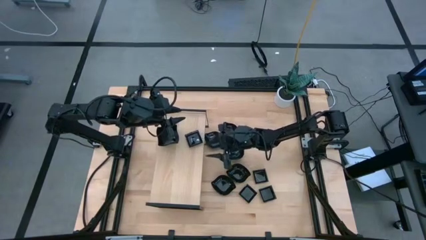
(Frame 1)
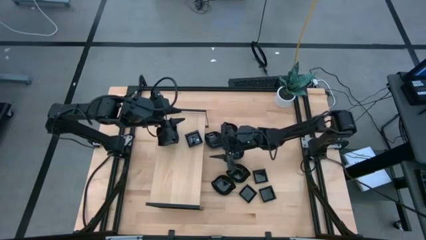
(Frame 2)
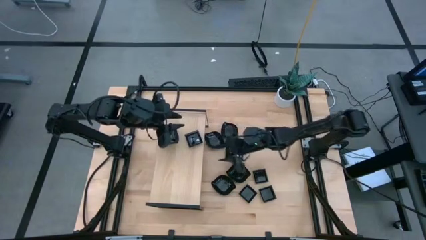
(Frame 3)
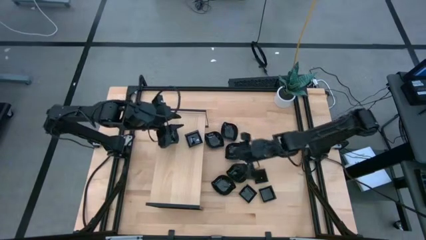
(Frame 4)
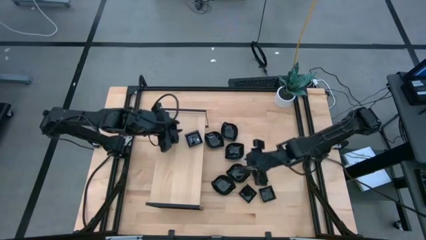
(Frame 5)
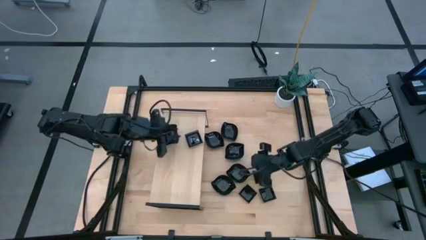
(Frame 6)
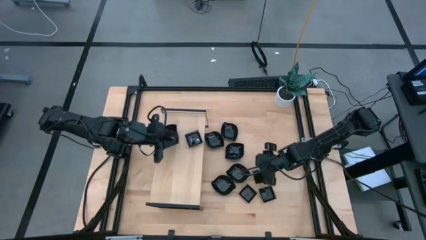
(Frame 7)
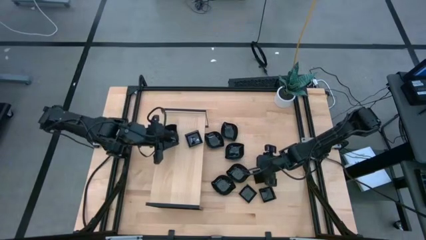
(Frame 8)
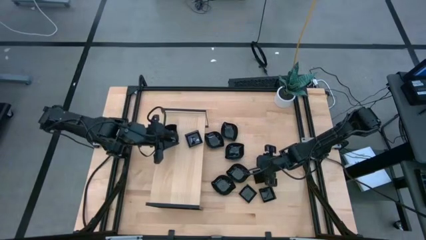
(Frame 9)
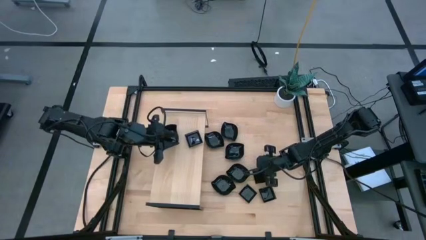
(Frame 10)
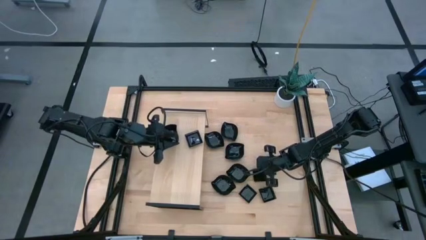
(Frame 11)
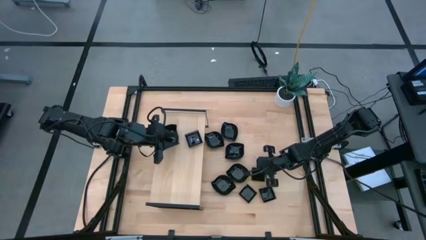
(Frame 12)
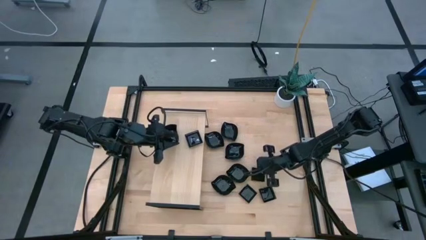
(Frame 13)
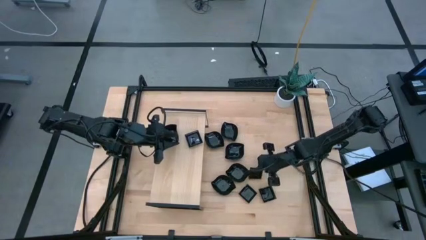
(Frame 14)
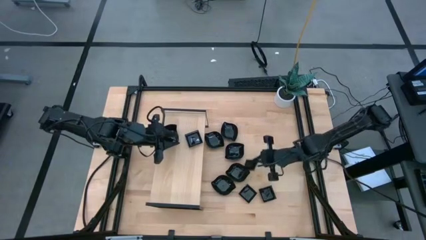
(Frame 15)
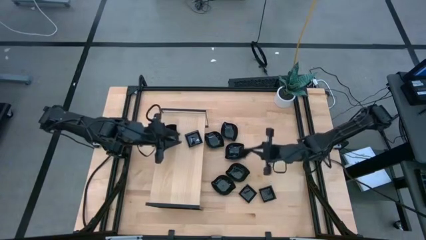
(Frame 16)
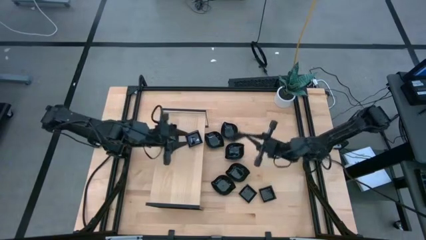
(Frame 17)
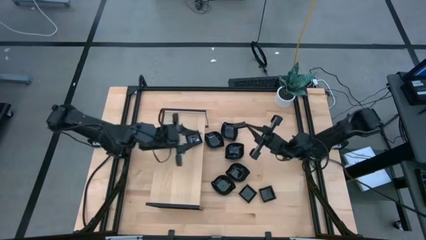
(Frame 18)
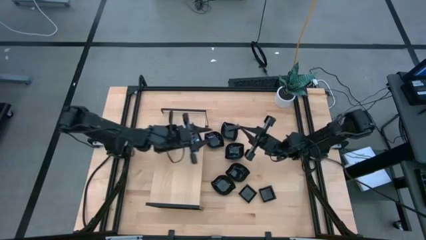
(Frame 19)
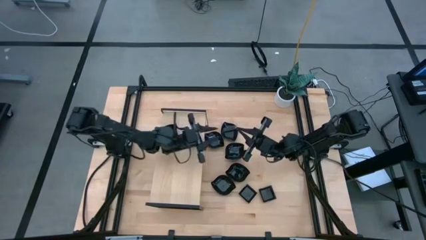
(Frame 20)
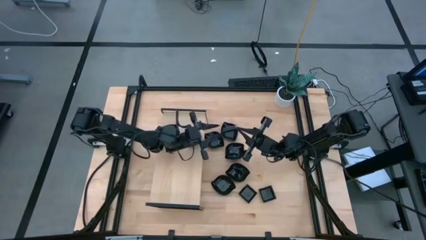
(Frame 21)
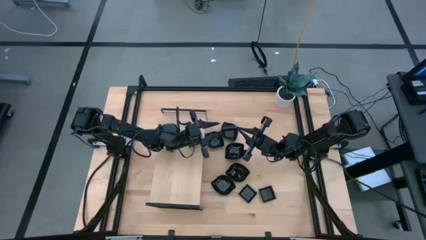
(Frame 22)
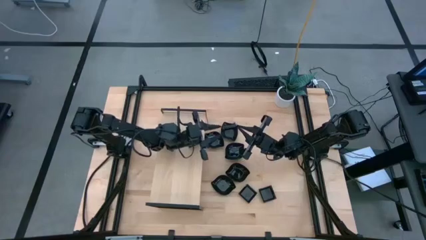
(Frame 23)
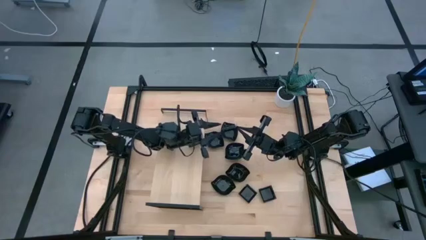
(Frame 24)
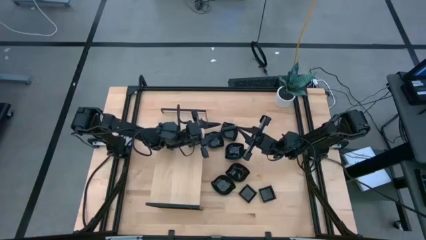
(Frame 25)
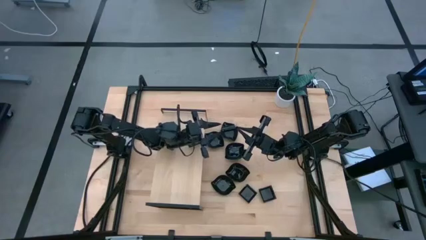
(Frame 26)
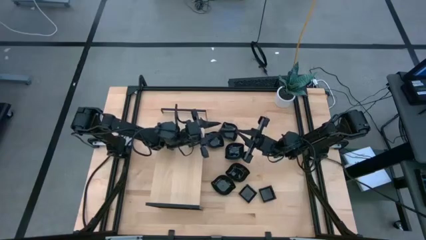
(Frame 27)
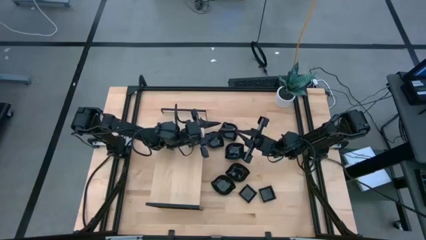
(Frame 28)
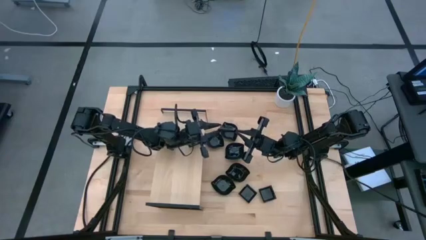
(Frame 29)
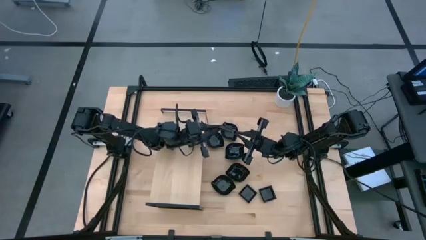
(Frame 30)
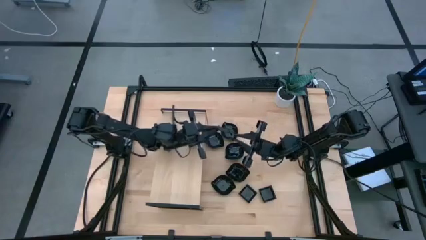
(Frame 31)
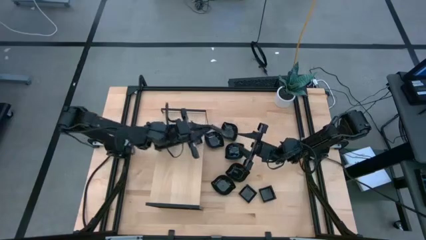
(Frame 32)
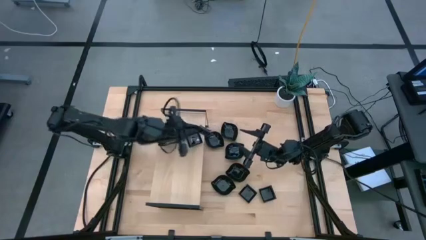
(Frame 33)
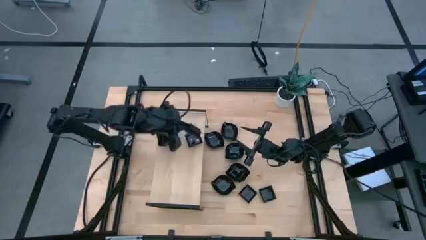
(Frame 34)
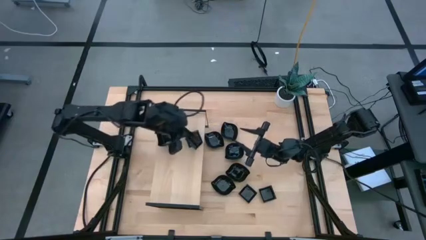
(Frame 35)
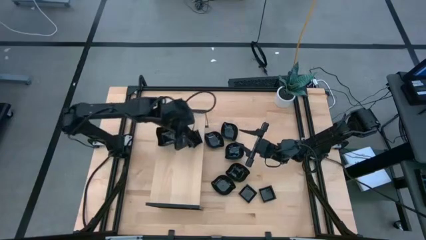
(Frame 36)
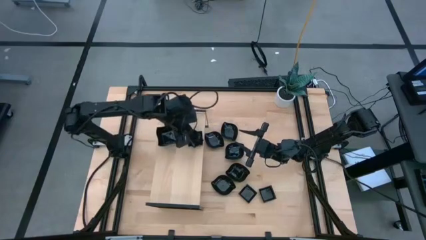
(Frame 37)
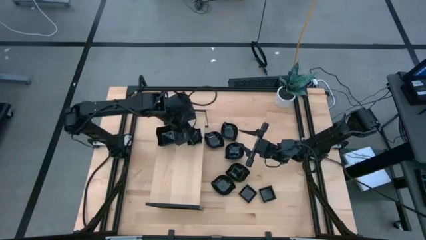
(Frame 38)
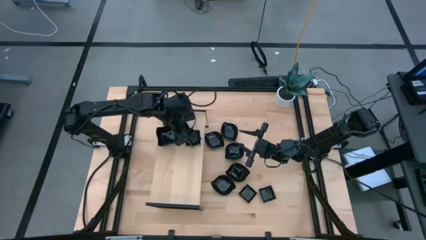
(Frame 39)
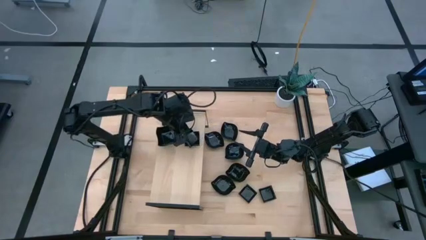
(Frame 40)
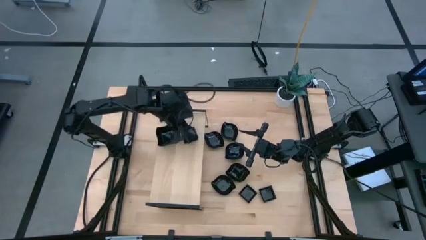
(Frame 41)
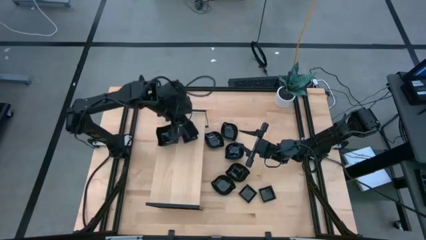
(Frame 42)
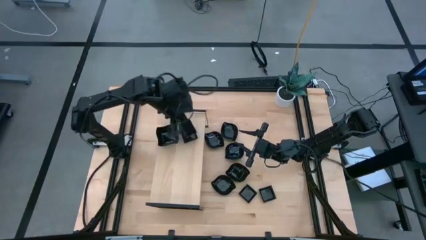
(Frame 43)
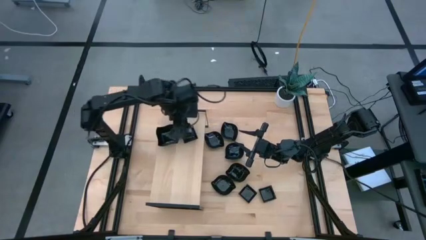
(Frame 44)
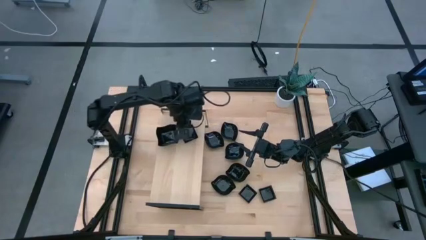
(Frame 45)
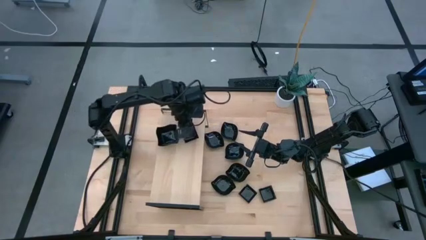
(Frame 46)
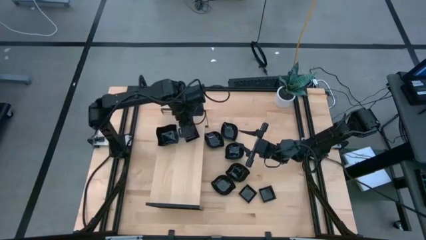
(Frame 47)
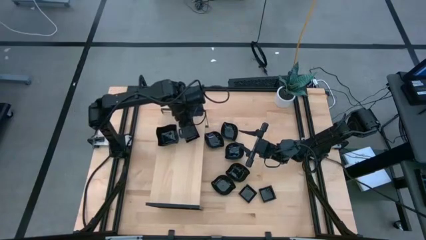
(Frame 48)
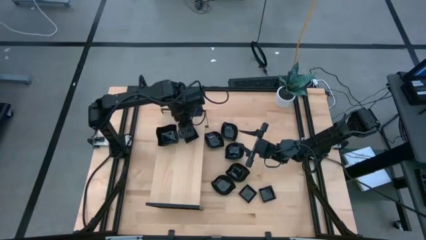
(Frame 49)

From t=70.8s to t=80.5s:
Task: Pick & Place Mini shaped plates
Stack the square plate on top of the square plate on the shelf

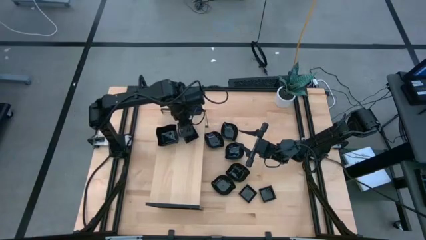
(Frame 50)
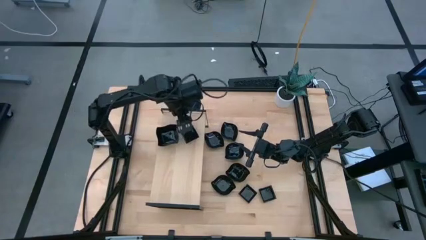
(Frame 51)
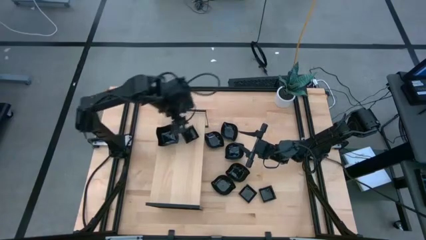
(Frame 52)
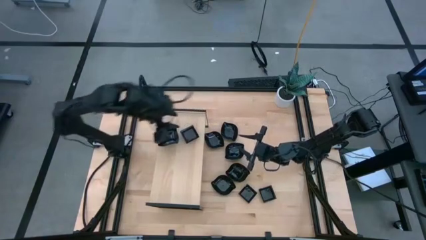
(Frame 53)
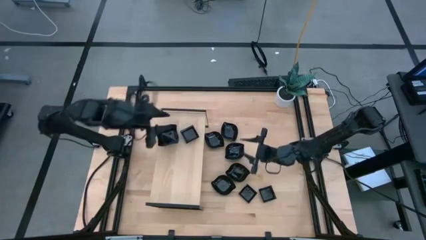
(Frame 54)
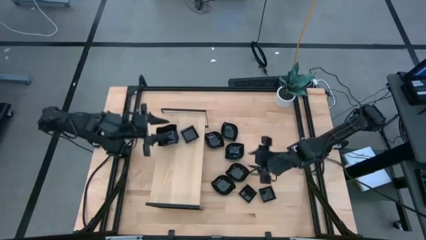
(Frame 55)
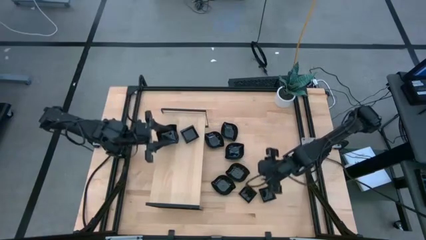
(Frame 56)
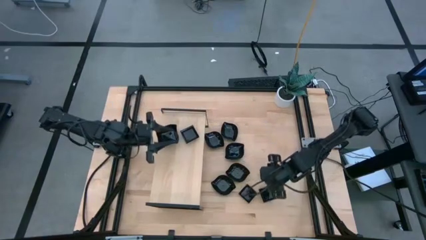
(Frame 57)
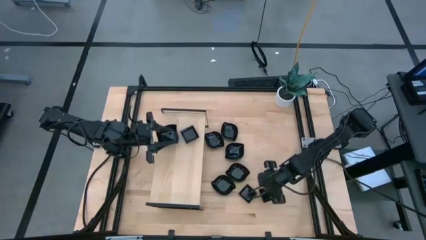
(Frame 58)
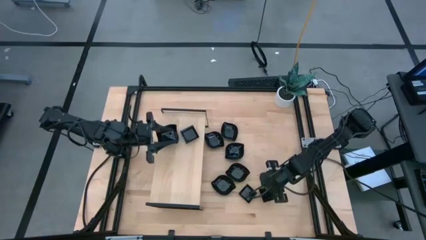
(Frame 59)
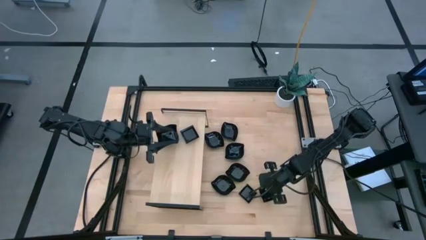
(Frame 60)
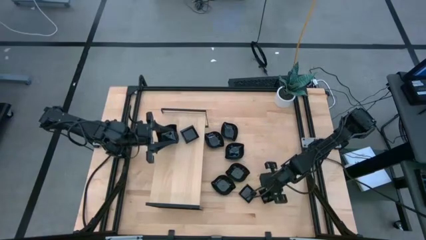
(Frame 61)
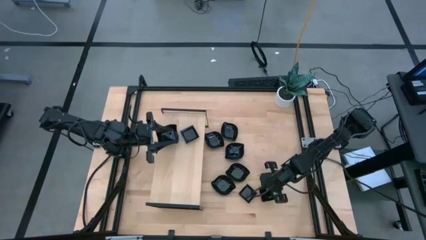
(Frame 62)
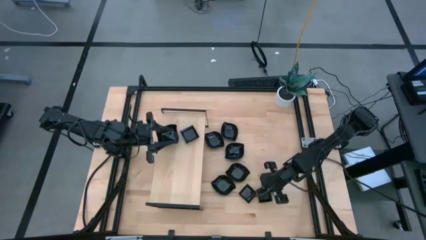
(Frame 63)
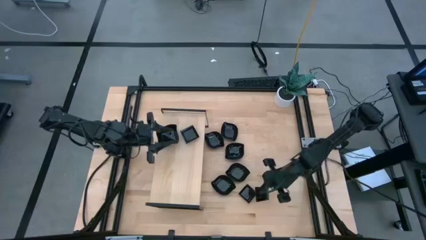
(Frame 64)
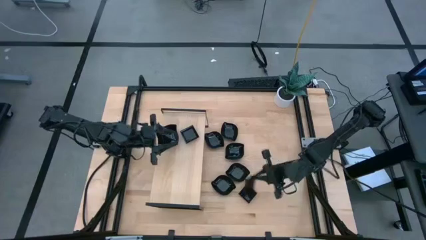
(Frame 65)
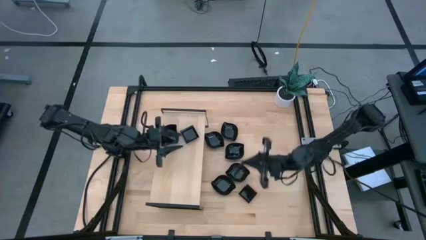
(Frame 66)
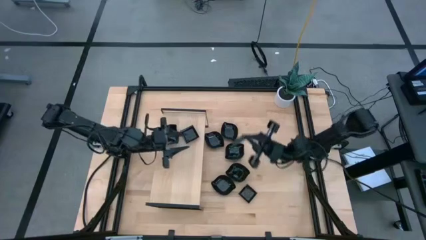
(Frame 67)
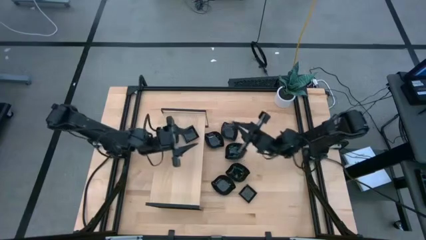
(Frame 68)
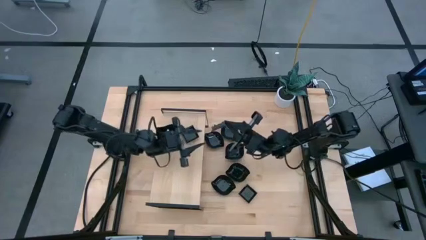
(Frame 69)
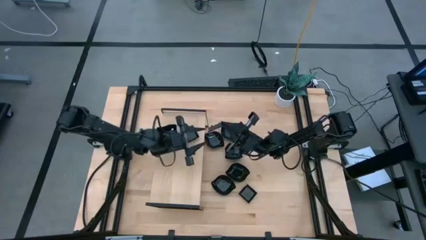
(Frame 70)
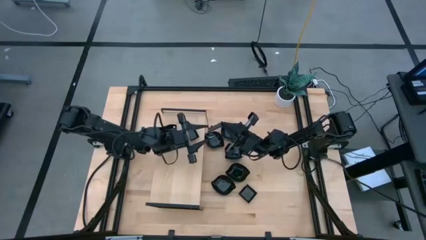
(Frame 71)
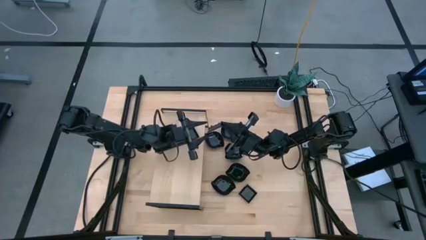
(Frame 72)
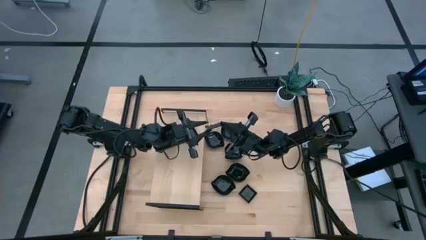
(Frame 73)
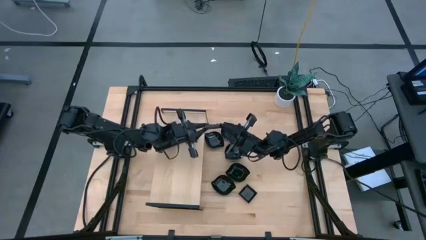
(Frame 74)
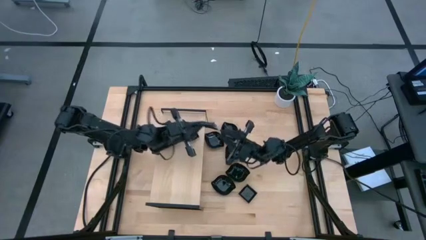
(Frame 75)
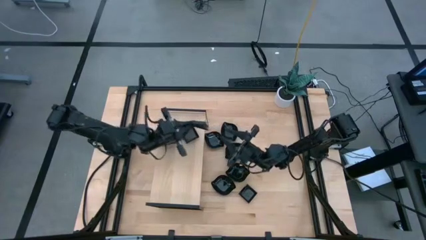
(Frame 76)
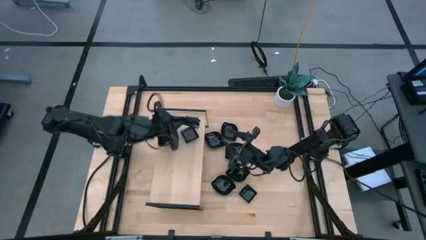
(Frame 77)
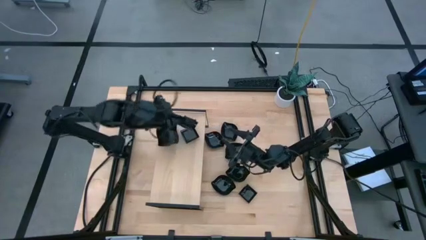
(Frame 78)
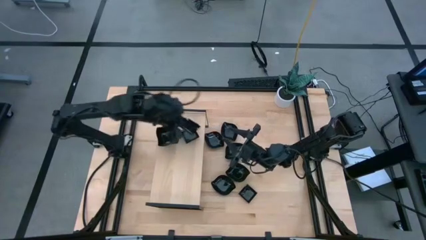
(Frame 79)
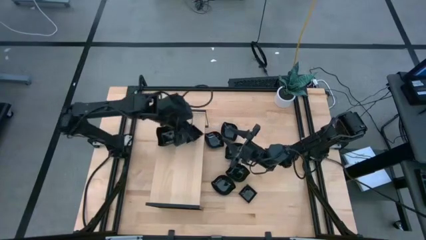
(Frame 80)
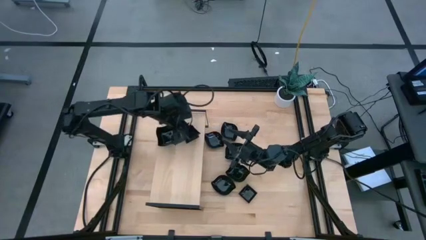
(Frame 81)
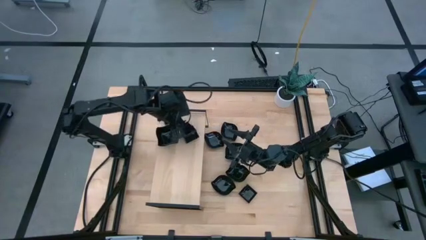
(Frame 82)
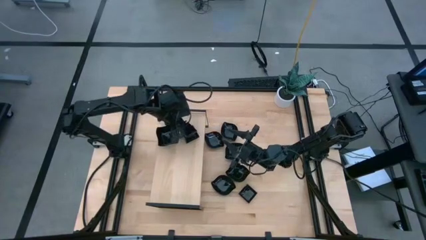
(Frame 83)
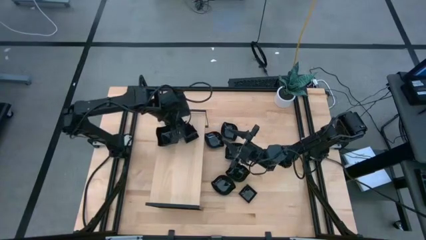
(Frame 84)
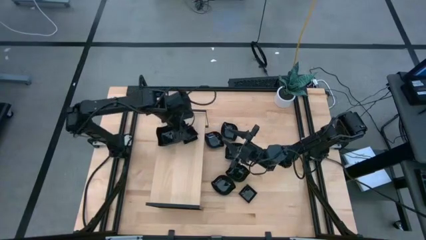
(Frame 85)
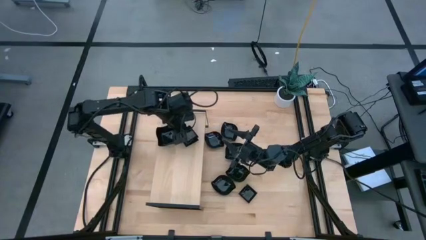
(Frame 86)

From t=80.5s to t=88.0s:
Stack the square plate on top of the square plate on the shelf
